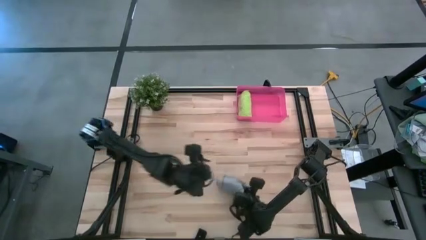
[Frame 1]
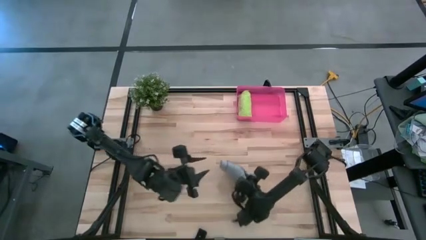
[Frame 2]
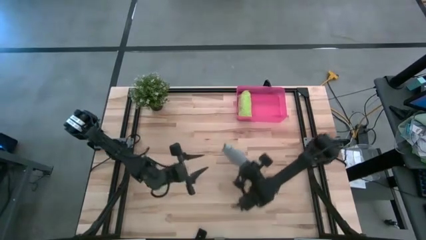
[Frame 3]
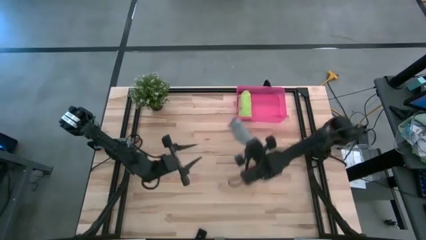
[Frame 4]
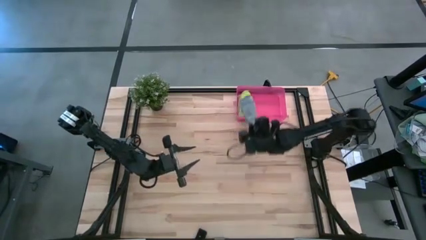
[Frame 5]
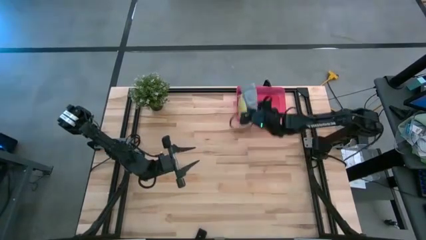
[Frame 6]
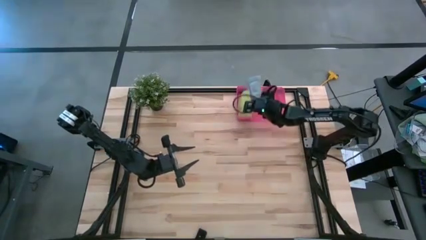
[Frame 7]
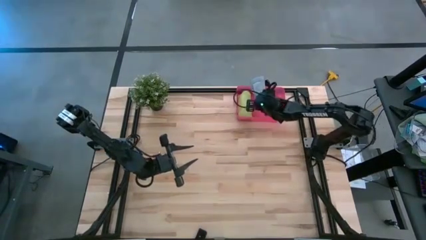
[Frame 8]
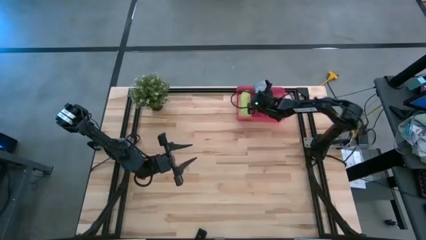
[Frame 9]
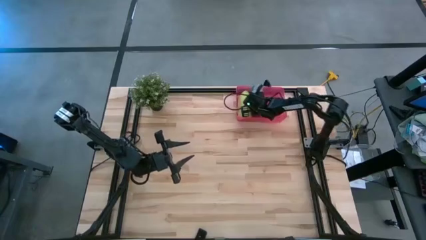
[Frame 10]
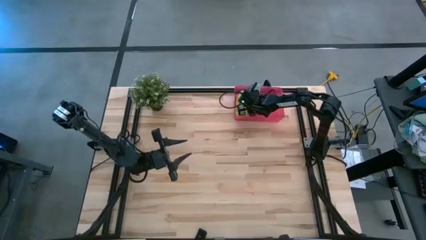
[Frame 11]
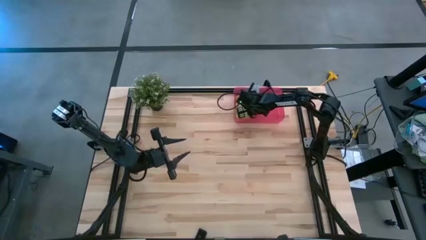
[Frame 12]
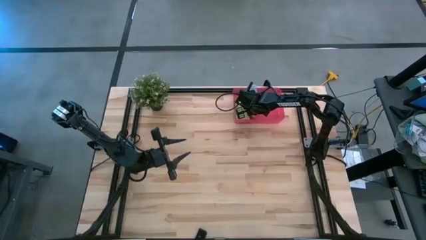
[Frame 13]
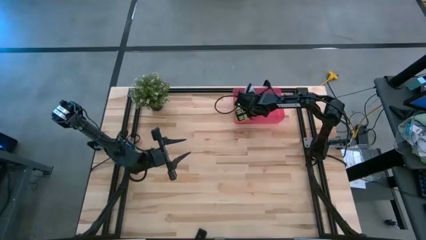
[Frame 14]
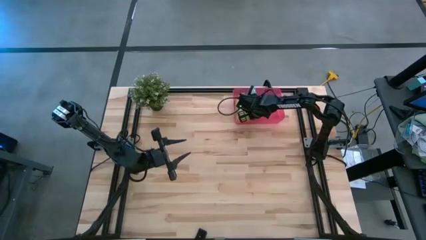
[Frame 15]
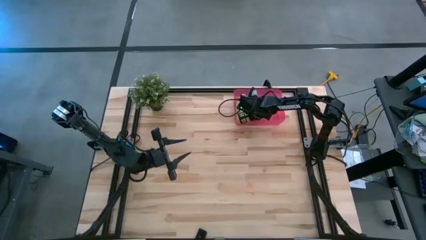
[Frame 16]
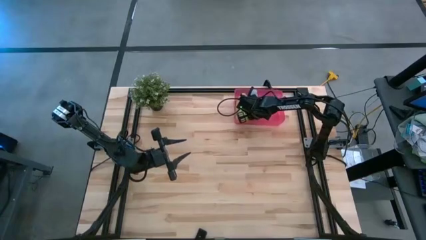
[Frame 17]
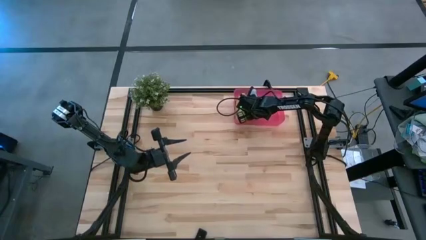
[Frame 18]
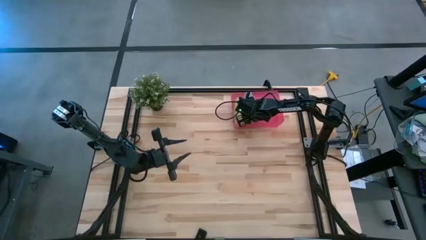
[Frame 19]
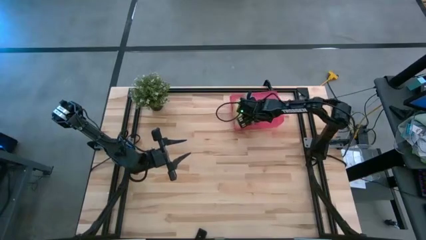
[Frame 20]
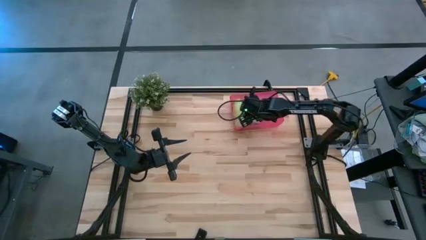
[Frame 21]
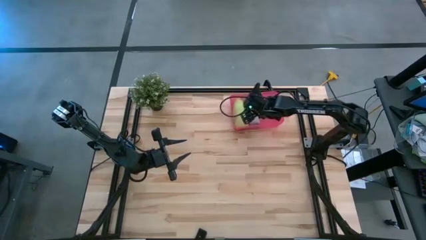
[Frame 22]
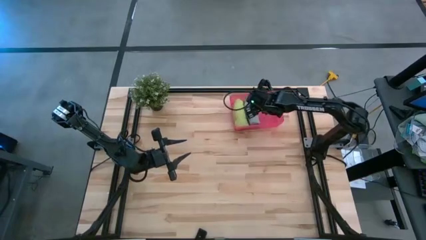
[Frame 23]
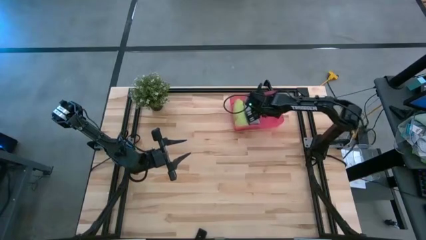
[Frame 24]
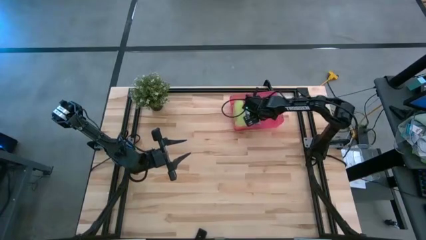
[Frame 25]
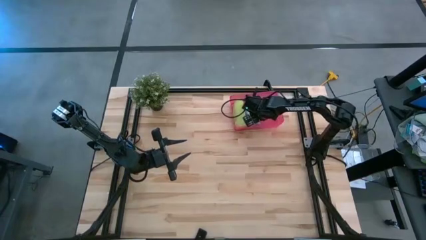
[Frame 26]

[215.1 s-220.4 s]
Task: Roll microfiber towels into tight, uniform cylinder then place into a basket
Put the rolled gray microfiber cloth into the pink bin

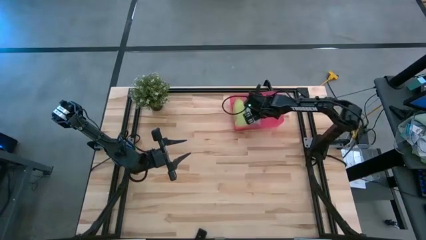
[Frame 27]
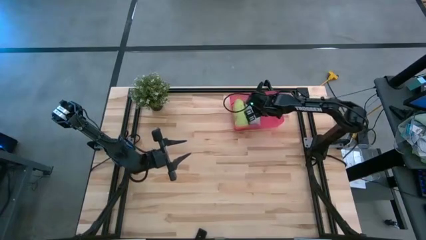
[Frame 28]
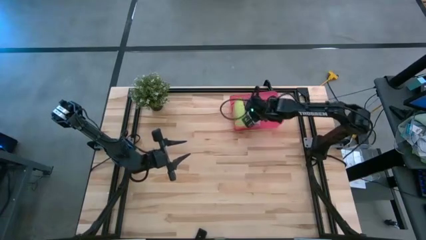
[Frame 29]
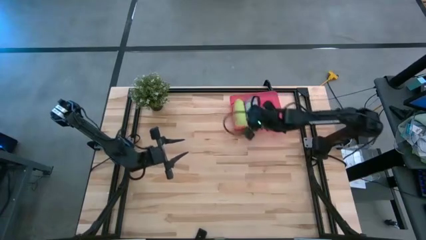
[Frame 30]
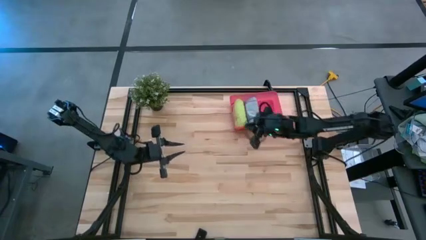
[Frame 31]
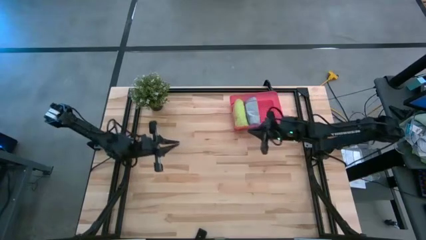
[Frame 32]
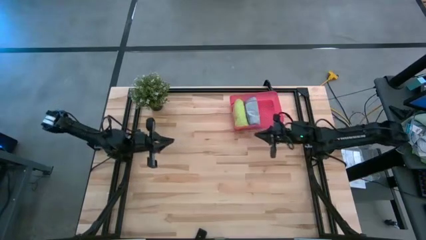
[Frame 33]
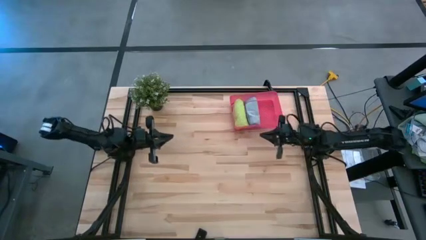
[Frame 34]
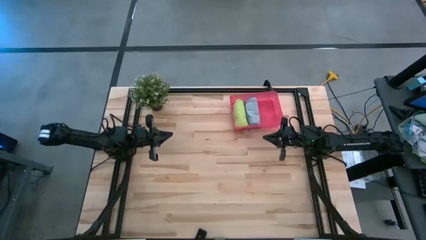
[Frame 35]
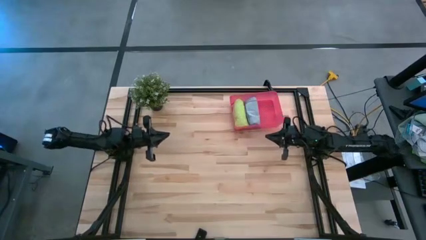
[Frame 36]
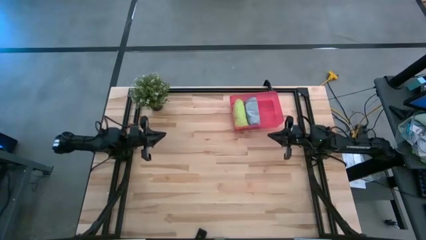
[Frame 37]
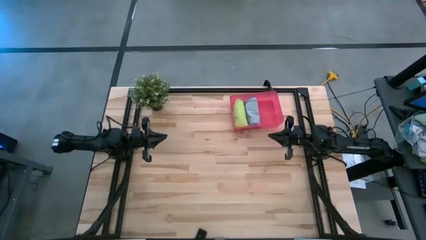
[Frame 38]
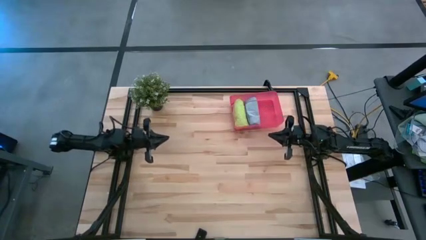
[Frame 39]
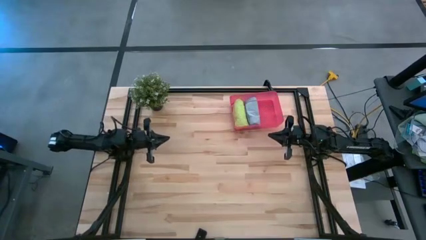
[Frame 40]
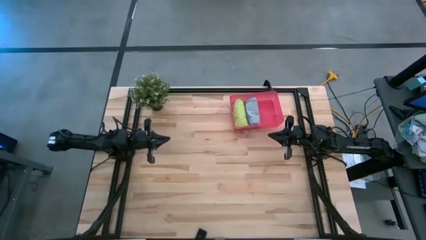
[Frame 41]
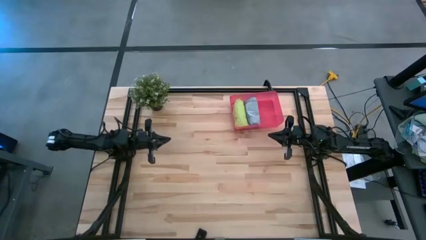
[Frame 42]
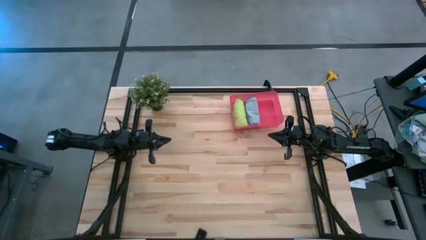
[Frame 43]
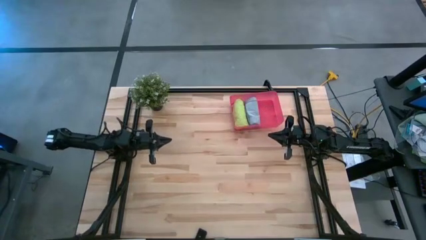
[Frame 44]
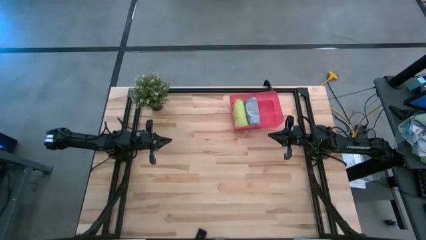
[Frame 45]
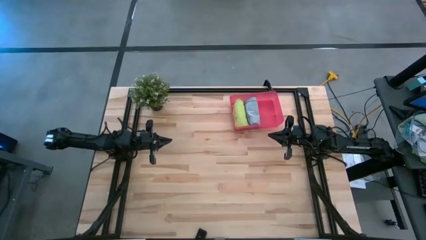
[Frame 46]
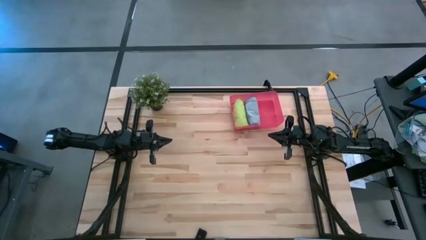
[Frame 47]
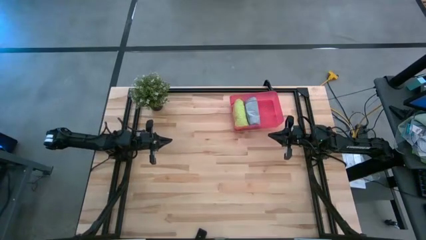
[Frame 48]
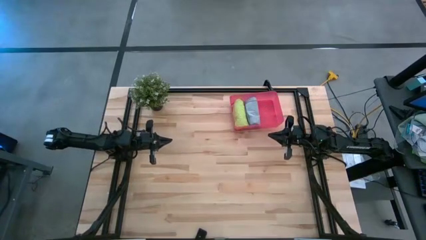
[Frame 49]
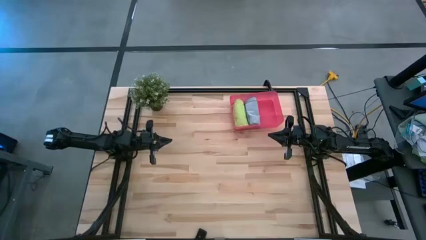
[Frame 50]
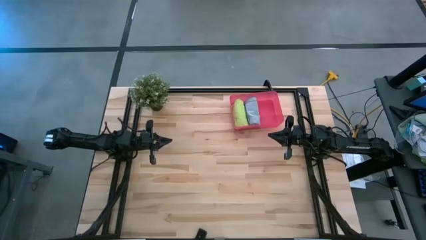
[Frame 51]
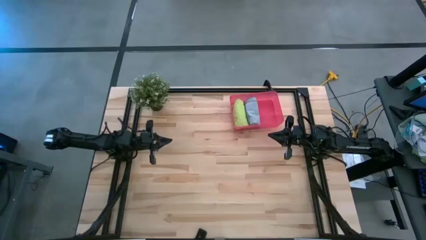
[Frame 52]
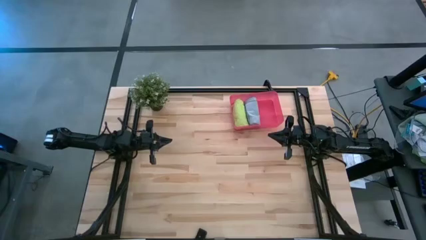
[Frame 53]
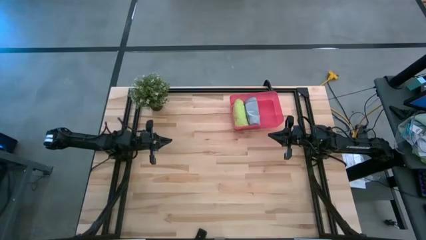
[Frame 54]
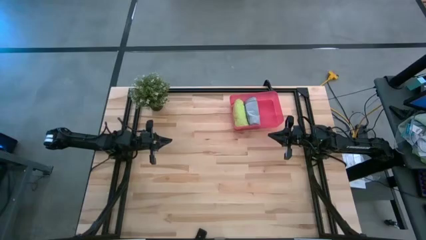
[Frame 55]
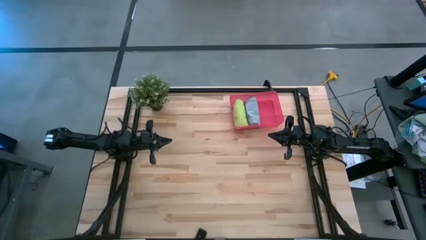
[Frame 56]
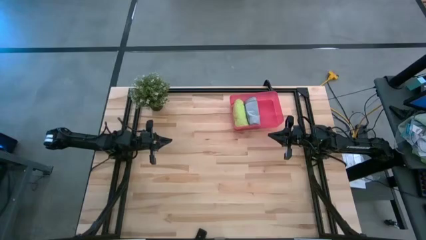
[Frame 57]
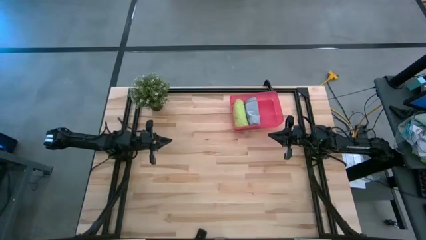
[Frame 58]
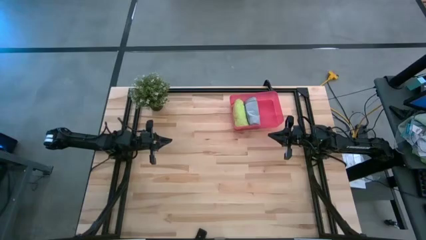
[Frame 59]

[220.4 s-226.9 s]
Return to Home Position

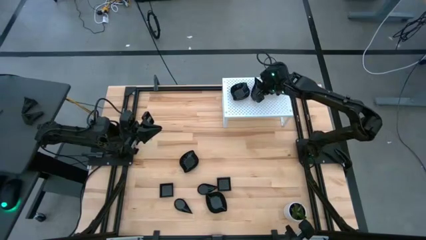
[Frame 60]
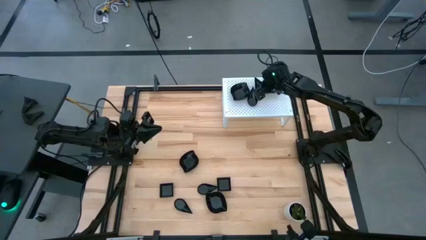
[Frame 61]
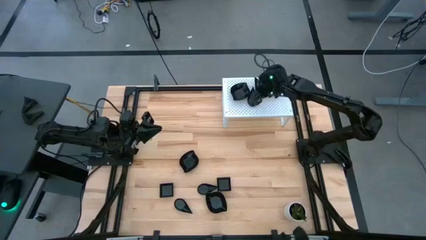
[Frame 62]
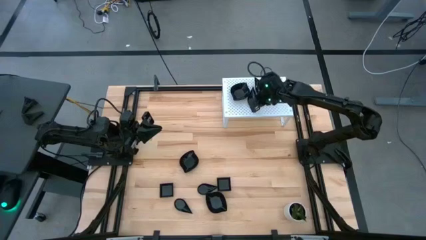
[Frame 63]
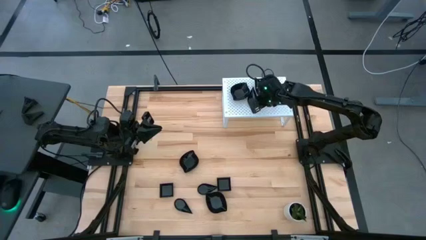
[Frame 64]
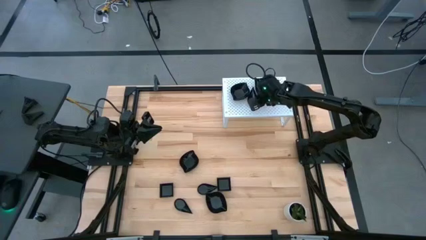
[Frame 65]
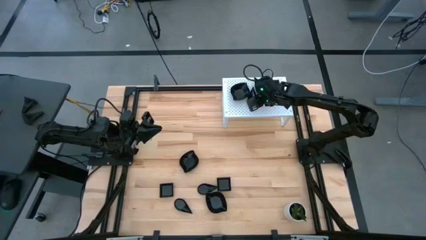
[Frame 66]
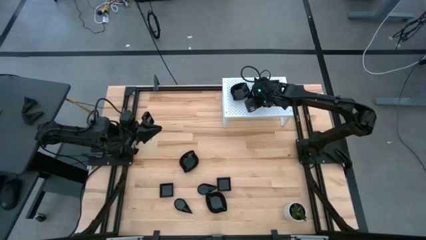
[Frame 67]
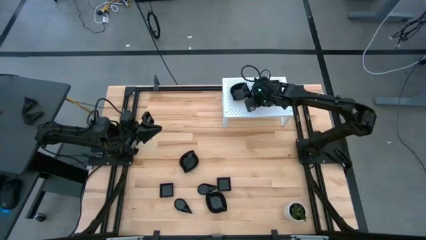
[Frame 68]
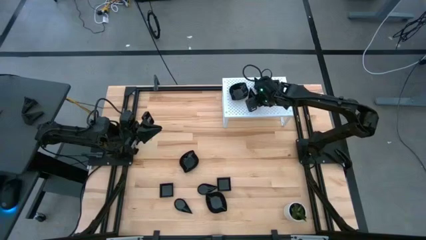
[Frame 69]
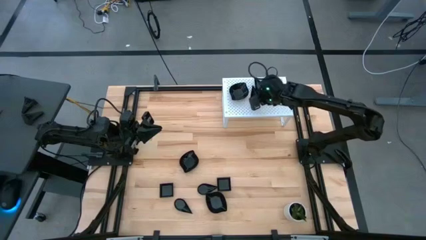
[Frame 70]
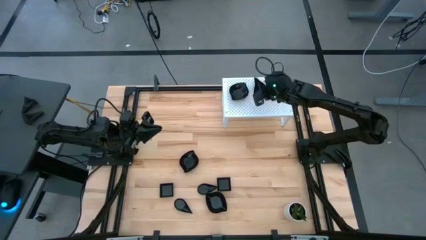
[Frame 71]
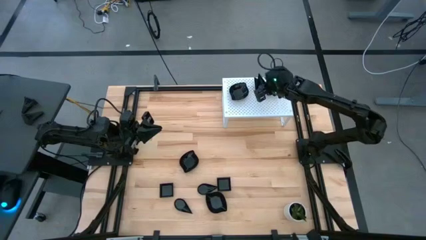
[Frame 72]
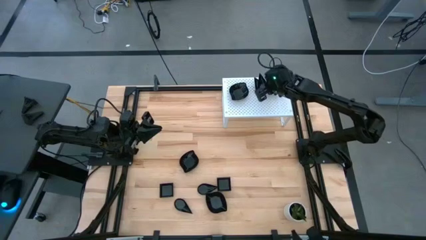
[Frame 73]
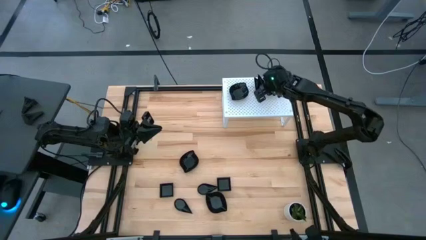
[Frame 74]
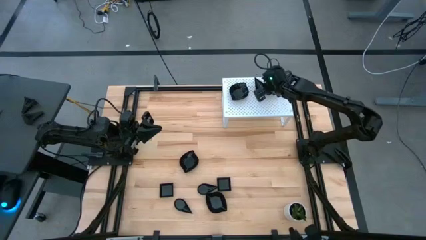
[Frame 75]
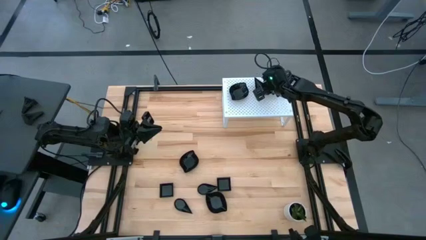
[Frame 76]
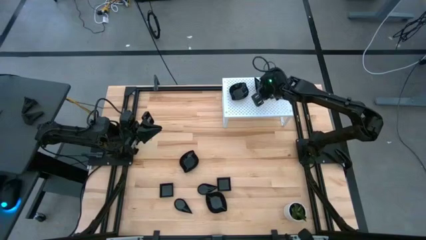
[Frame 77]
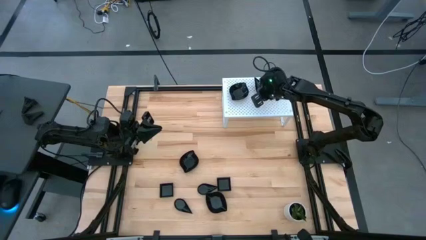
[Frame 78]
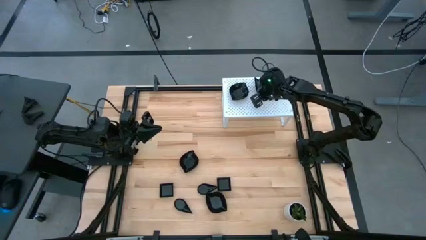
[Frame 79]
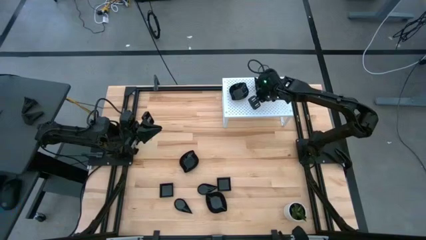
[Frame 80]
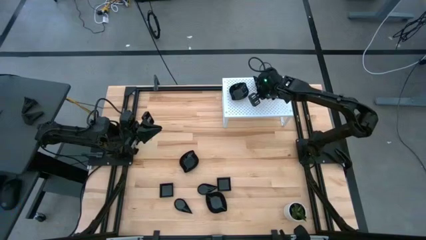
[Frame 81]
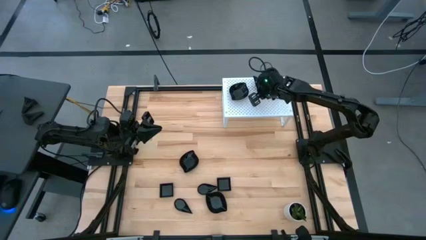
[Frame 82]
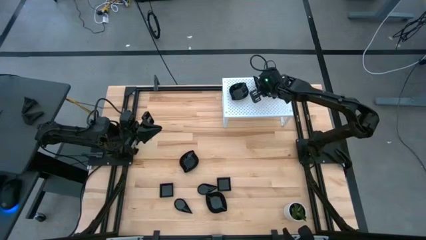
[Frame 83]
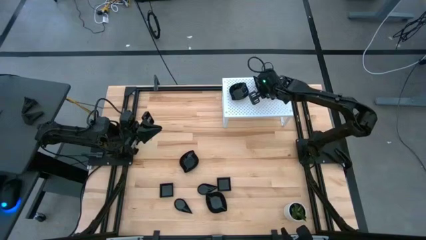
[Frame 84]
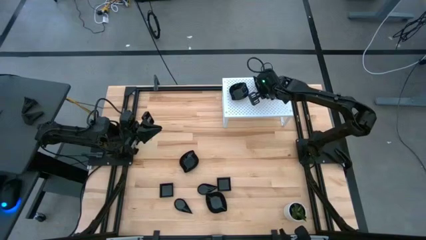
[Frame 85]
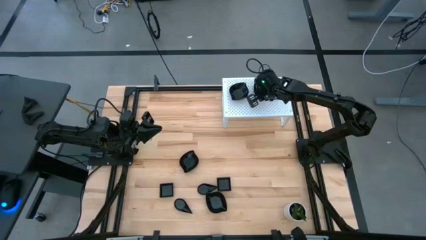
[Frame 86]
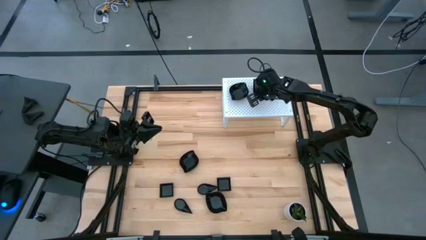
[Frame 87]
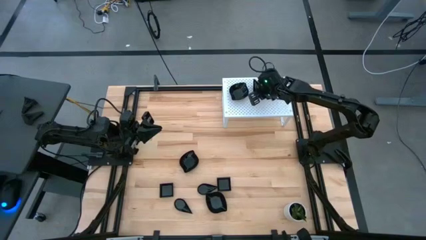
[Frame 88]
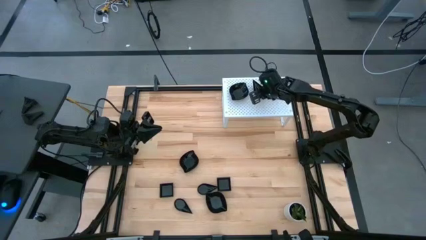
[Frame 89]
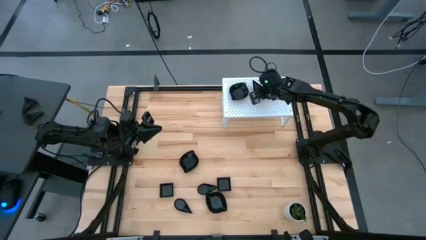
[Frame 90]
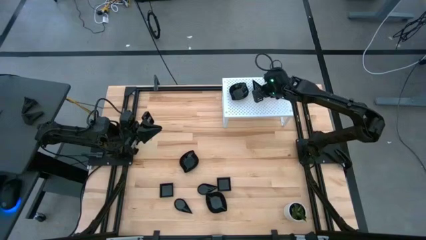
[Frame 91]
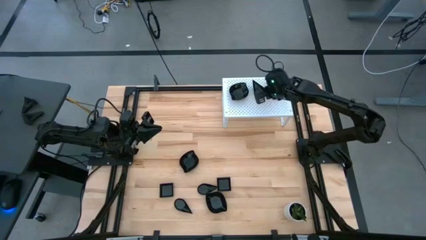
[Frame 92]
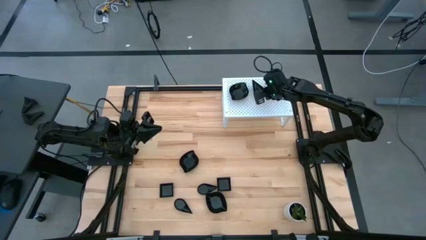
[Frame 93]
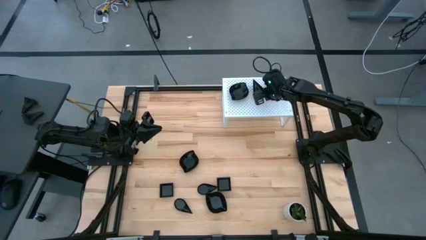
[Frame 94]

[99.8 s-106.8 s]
Task: Pick & Place Mini shaped plates
Stack the drop shaped plate on top of the drop shaped plates on the shelf
